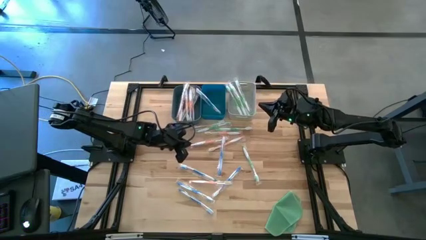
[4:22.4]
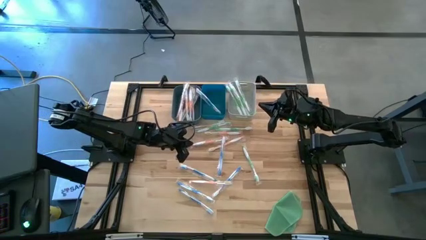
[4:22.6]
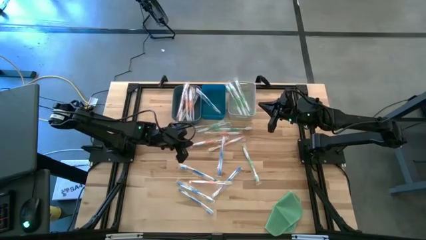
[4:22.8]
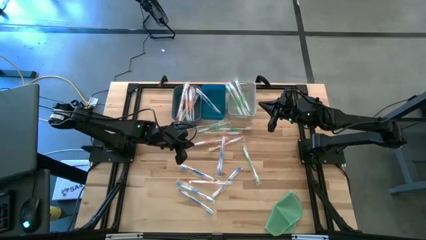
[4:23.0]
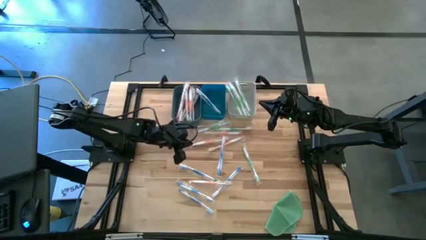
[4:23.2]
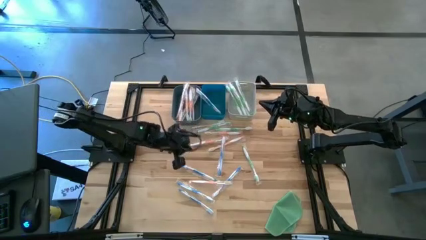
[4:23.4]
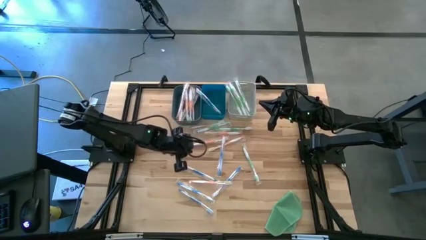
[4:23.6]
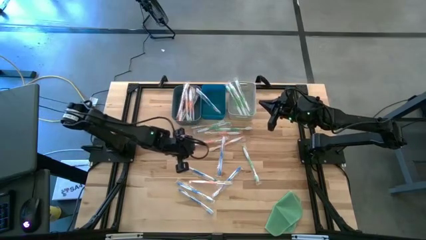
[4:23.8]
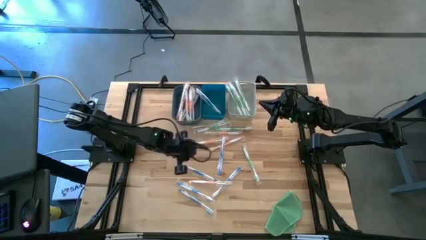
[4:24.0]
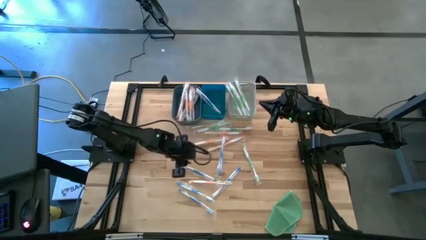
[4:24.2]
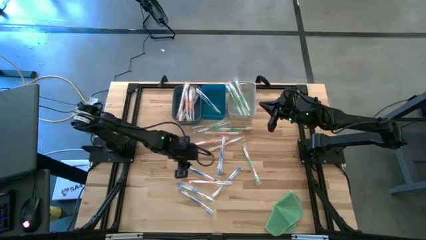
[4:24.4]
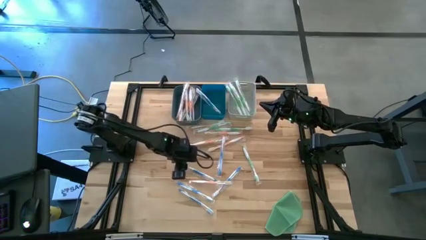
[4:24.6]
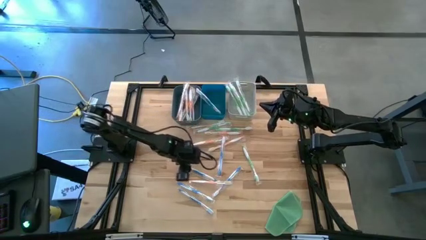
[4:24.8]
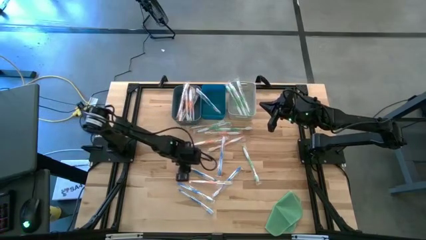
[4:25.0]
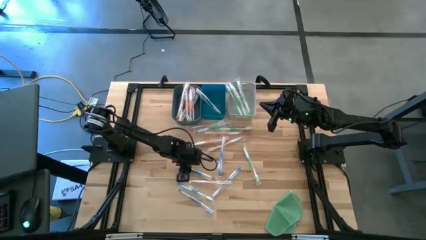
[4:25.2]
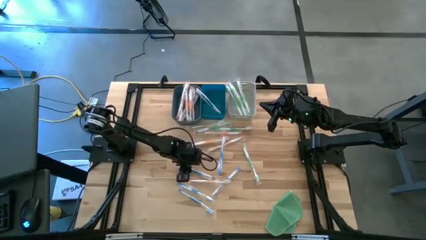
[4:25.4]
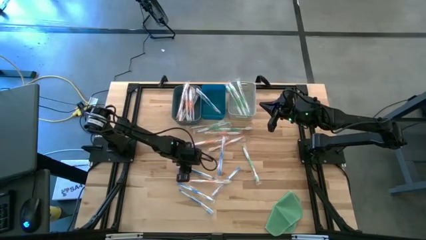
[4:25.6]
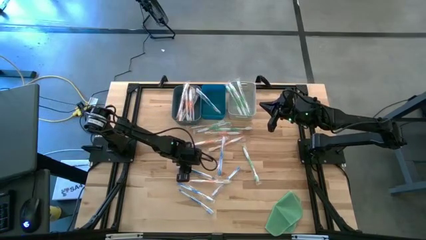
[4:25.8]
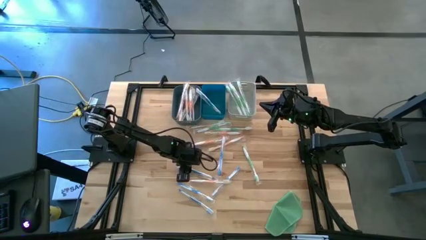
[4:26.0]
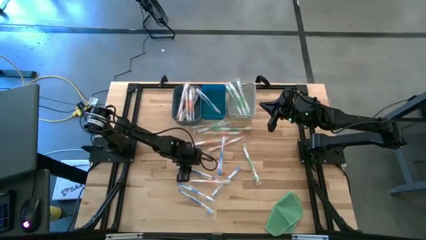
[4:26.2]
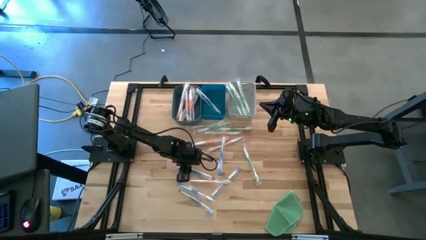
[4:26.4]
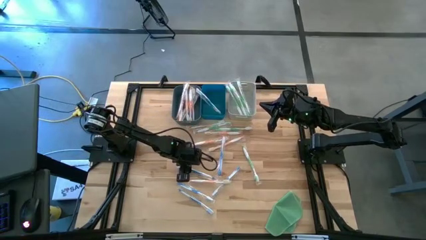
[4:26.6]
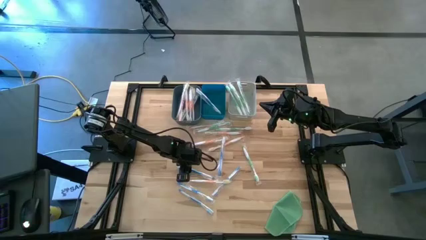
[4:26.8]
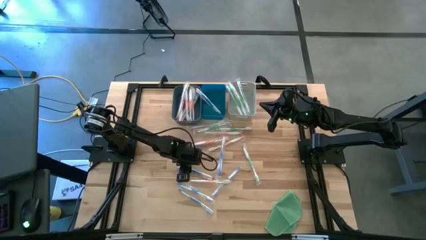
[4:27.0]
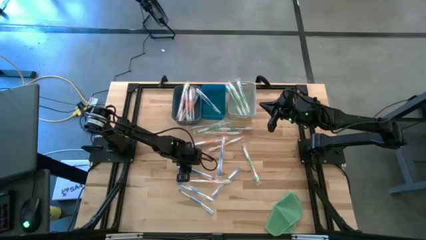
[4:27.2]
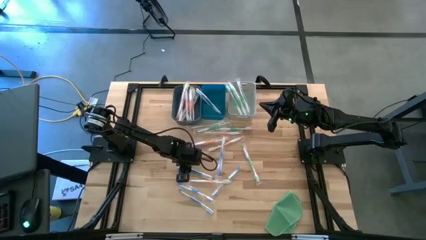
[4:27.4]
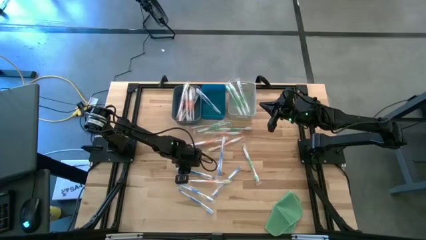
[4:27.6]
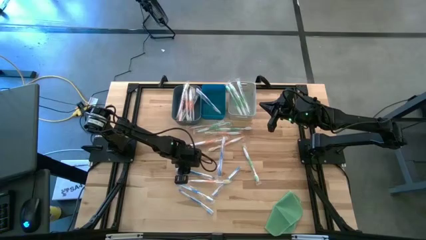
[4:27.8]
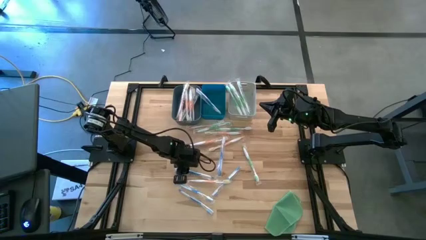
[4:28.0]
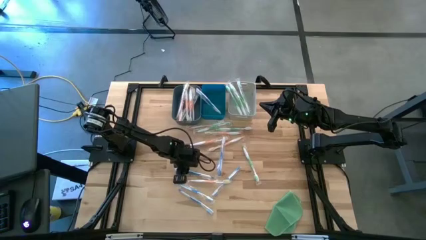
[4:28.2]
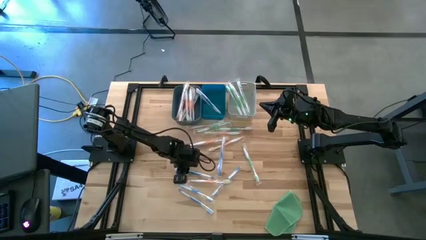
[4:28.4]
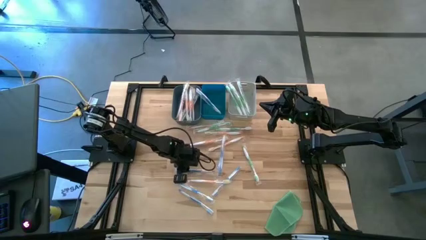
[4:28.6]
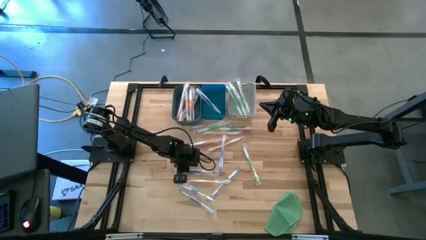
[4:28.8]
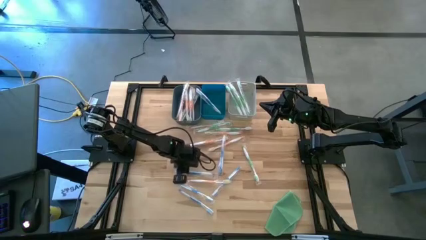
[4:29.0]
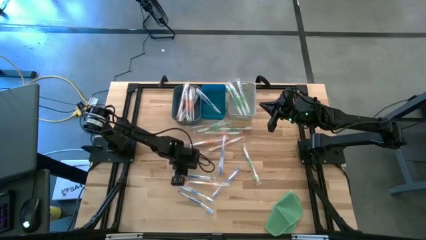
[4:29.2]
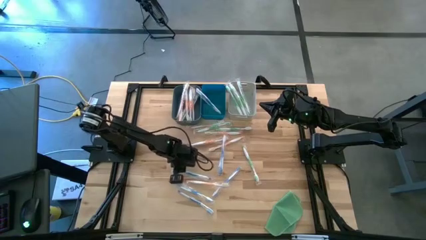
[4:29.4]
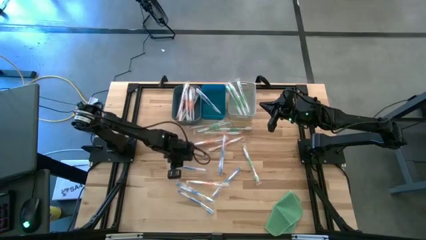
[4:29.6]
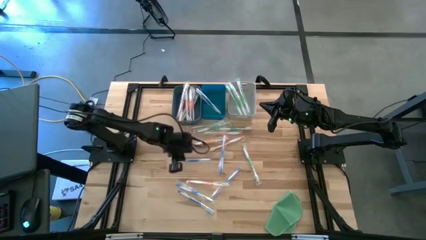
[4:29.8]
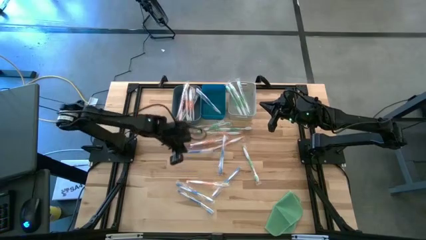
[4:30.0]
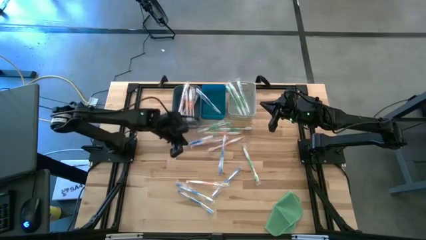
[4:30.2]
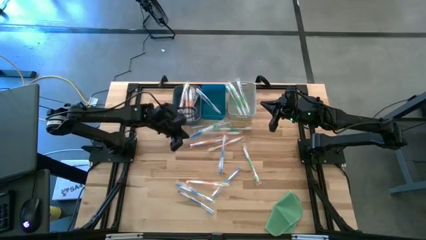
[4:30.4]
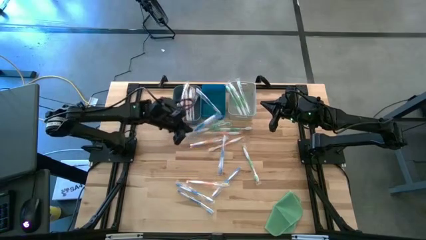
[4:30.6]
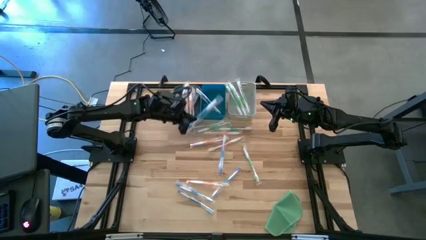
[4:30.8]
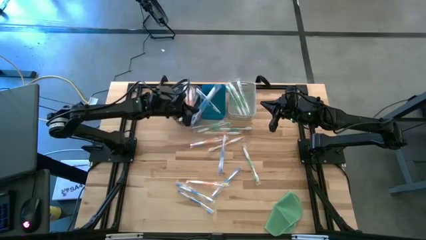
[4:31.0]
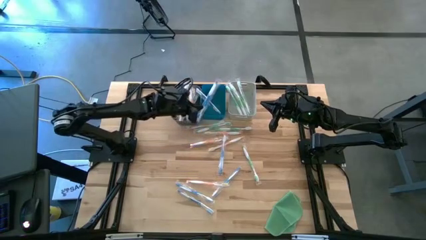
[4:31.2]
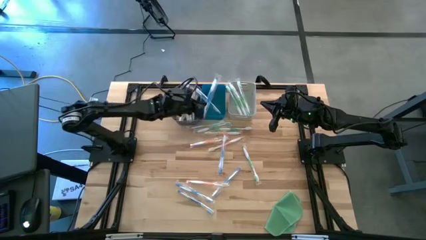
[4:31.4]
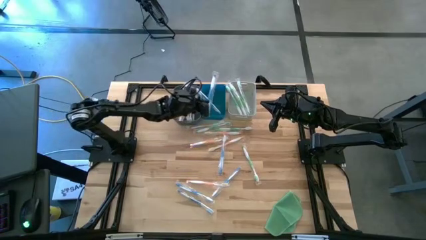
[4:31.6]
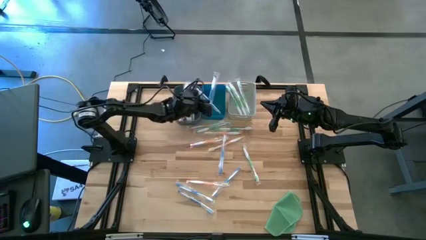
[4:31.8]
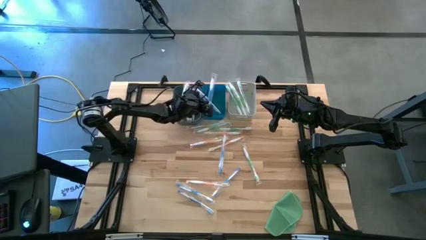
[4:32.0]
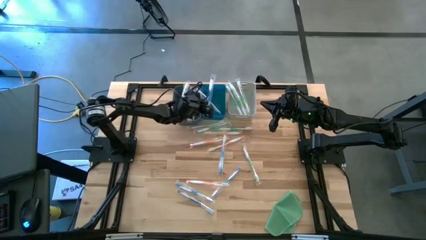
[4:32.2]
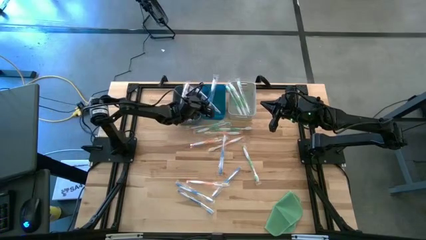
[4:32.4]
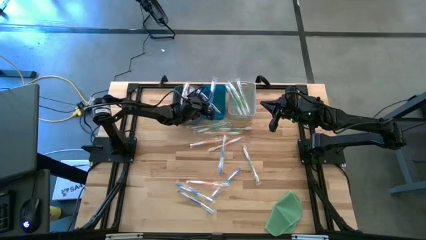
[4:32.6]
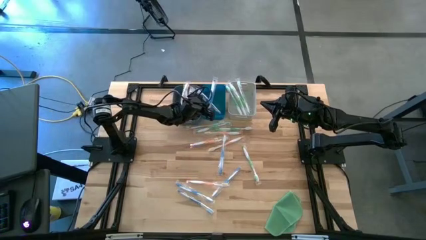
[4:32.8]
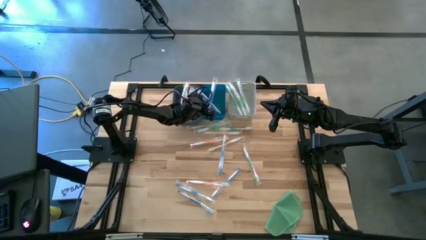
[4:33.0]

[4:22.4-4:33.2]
Task: Pick & Place Toothbrushes
Put the blue toothbrush into the blue bin

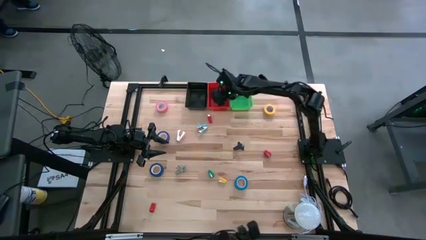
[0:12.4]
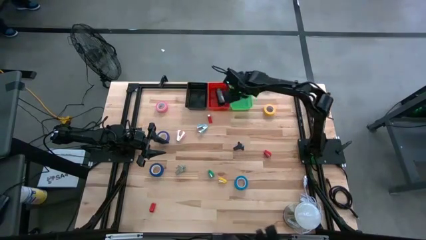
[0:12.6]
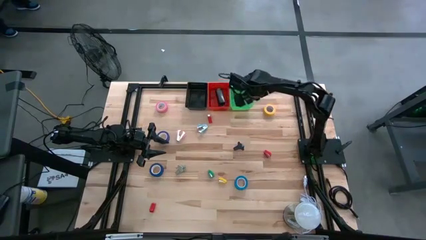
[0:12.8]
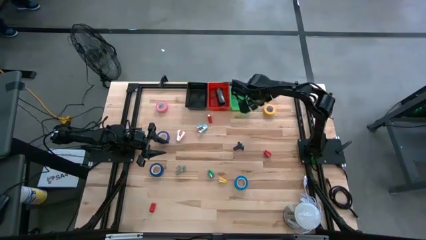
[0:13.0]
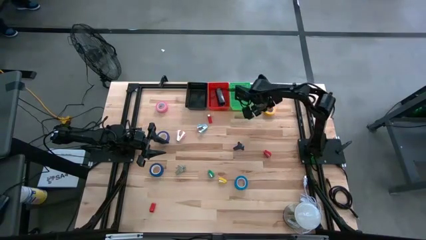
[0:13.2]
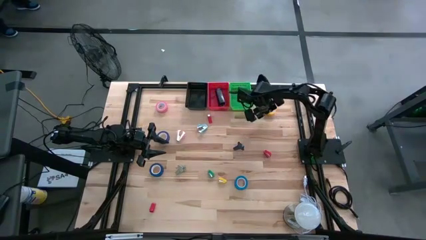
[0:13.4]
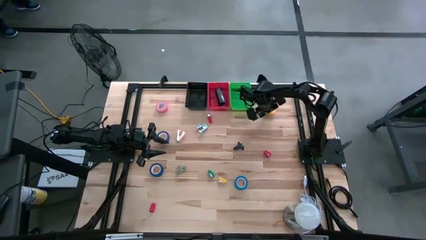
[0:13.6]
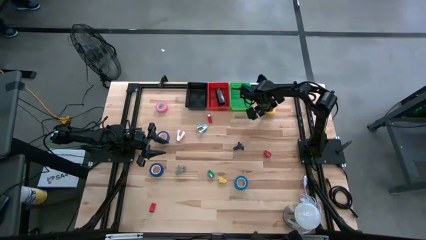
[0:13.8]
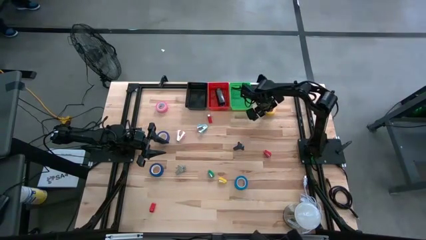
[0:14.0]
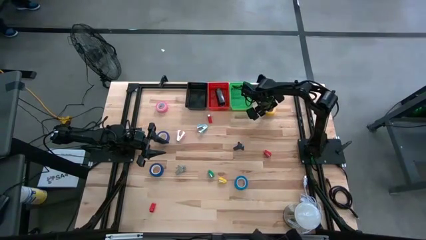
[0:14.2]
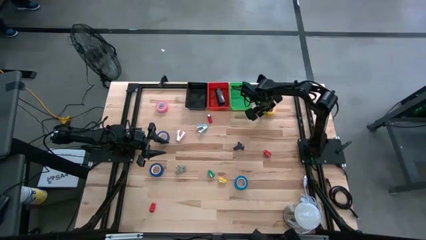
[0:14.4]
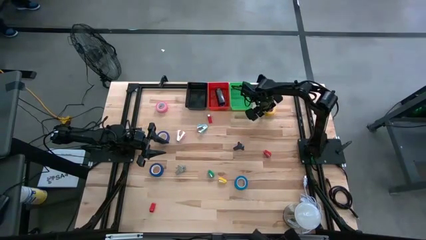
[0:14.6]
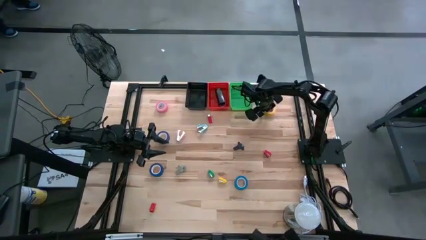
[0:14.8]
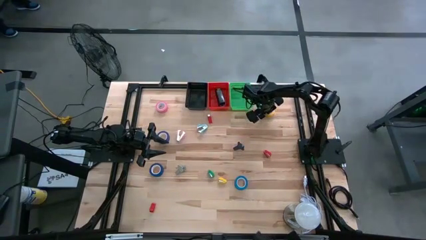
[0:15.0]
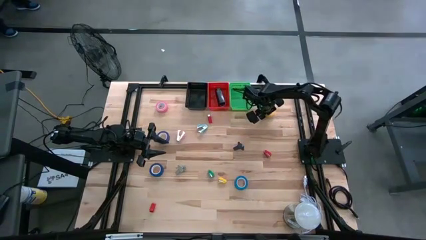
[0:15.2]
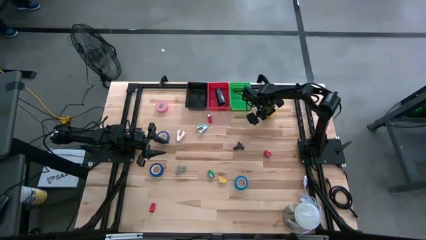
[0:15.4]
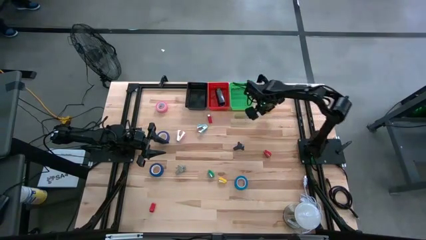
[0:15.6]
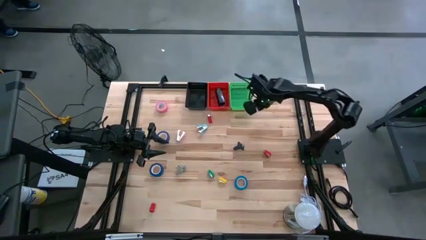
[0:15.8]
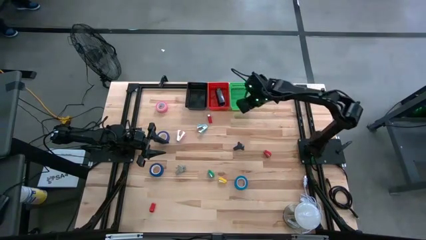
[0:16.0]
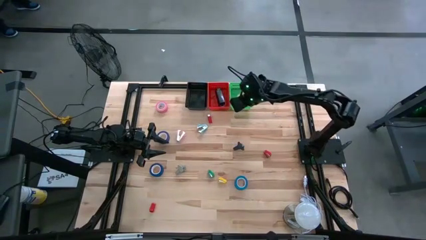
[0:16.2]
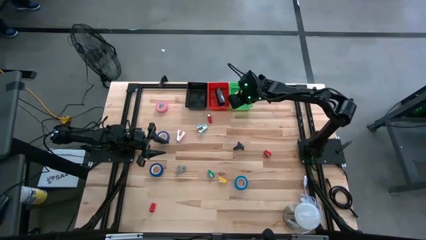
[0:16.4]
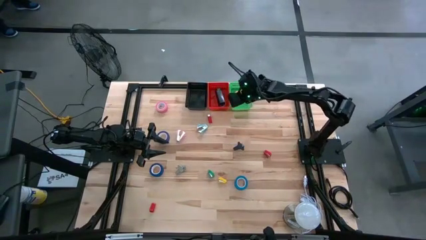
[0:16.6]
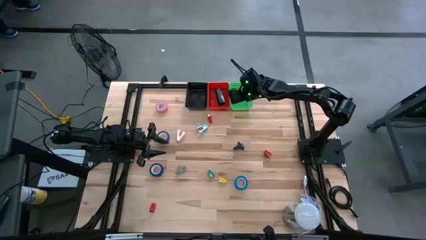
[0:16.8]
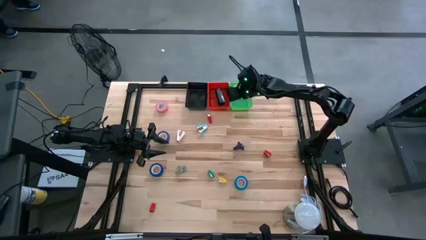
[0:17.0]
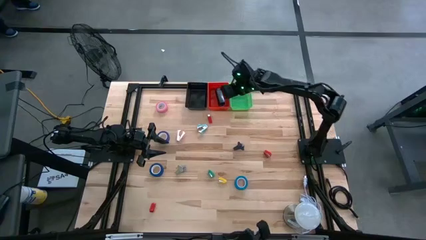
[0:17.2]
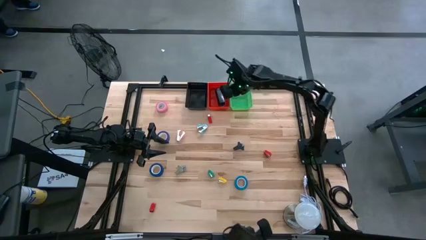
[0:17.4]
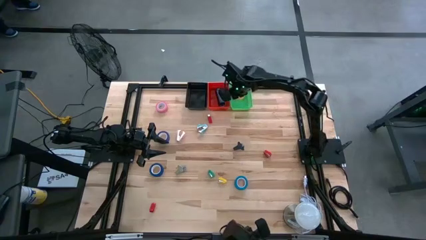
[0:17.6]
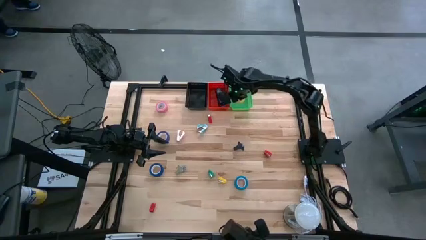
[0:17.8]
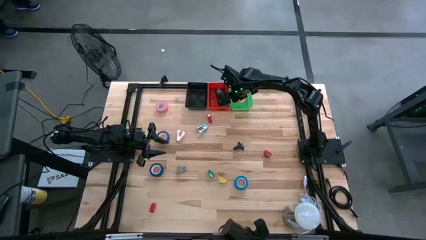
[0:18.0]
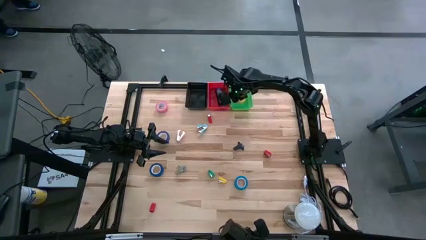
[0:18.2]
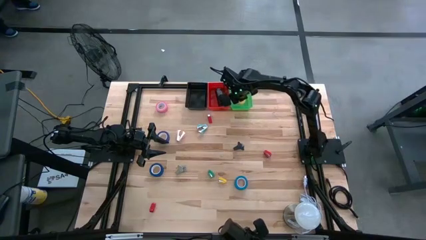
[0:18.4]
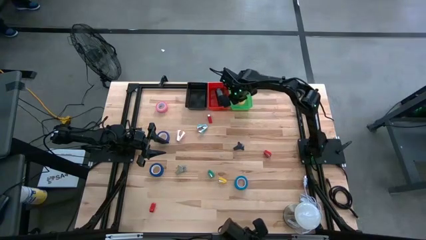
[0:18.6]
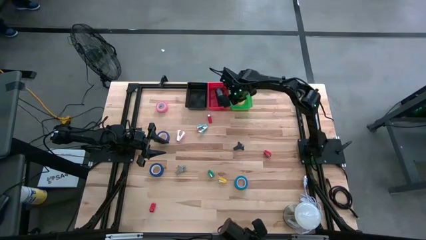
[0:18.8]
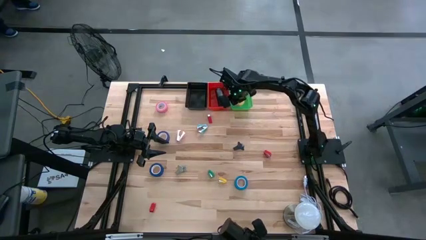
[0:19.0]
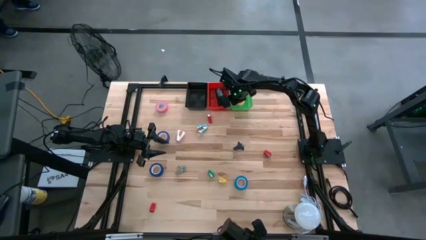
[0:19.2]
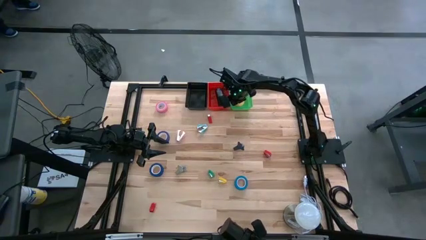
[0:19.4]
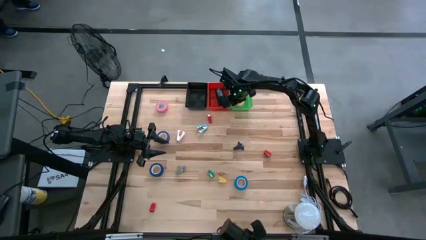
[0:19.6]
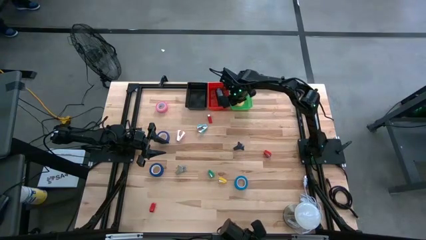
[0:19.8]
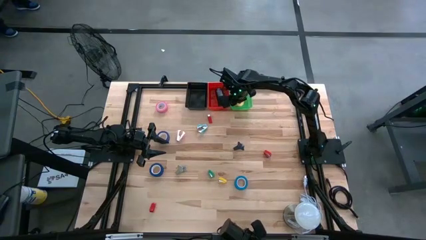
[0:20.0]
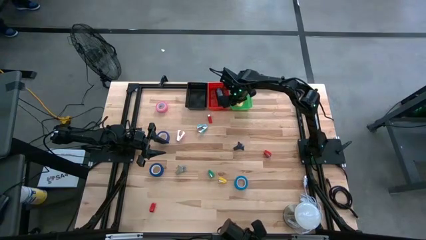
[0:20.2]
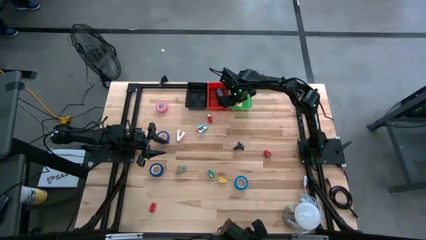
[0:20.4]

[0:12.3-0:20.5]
Task: Pick and place Stapler, Stapler remover, tape
Put the yellow tape into the green bin
